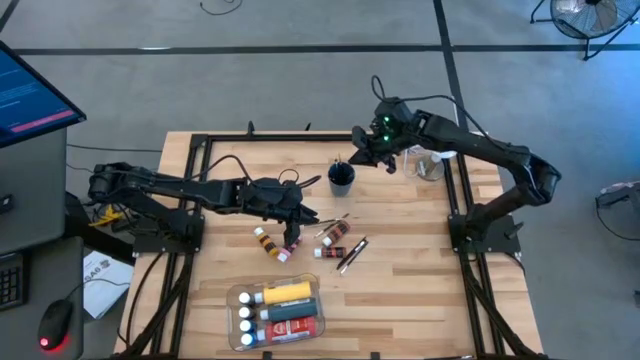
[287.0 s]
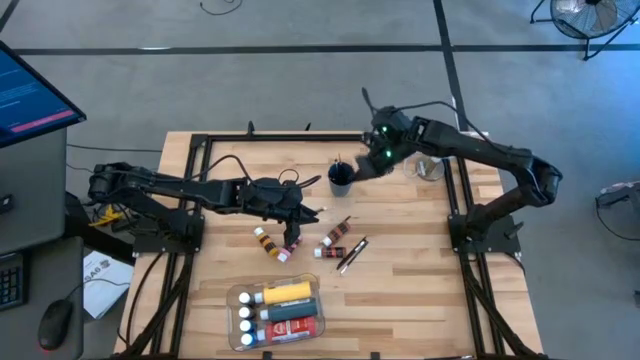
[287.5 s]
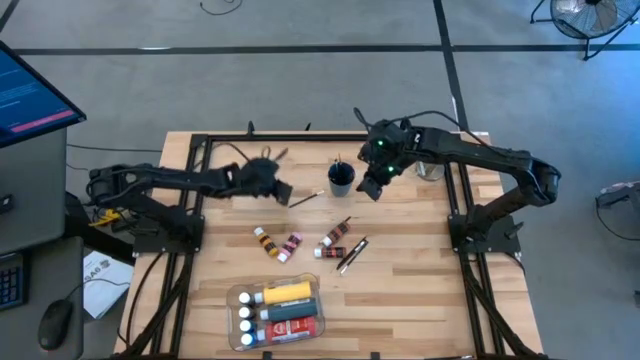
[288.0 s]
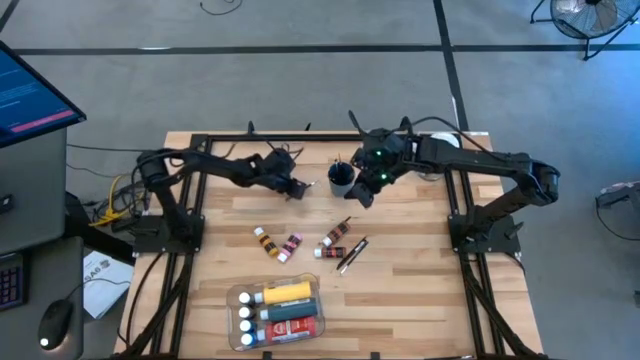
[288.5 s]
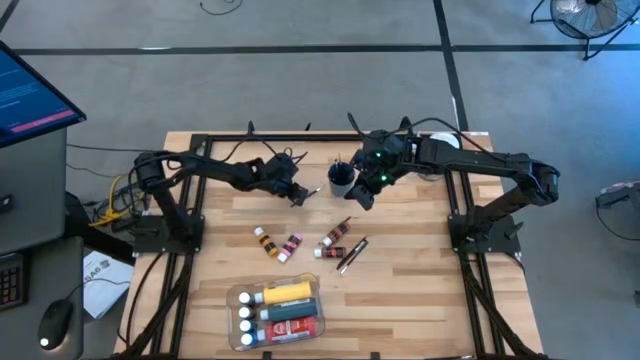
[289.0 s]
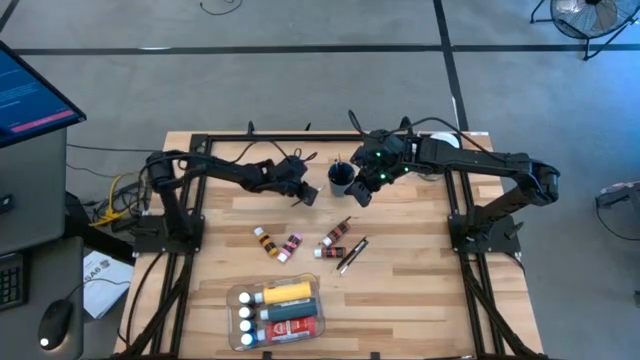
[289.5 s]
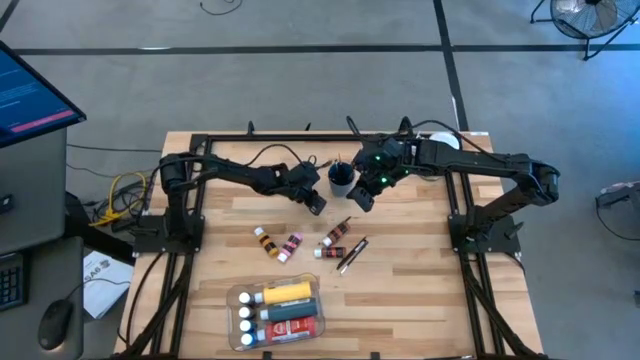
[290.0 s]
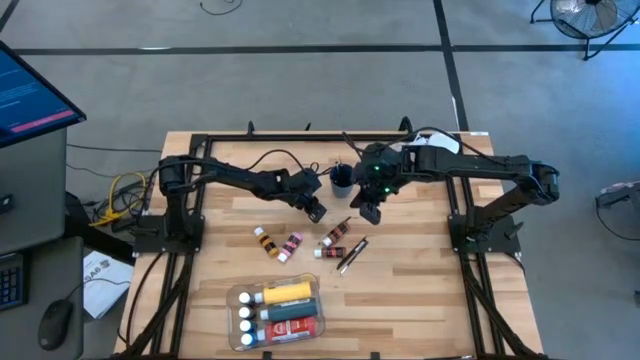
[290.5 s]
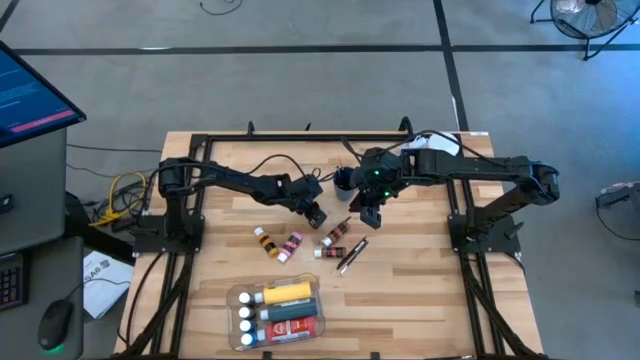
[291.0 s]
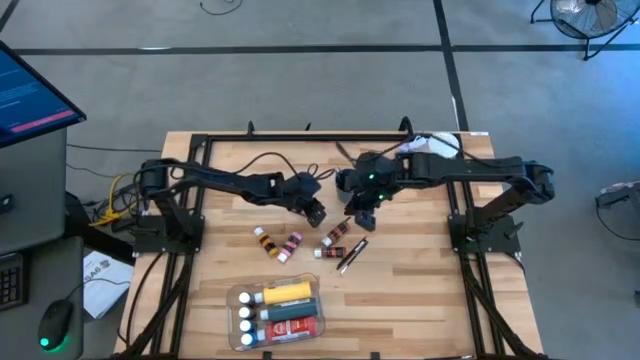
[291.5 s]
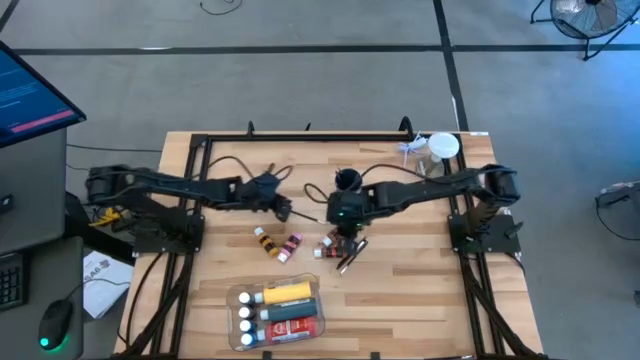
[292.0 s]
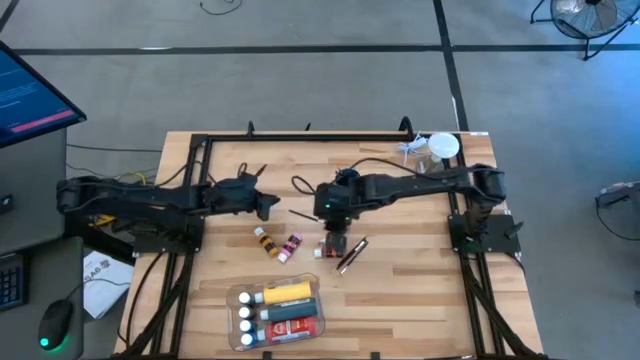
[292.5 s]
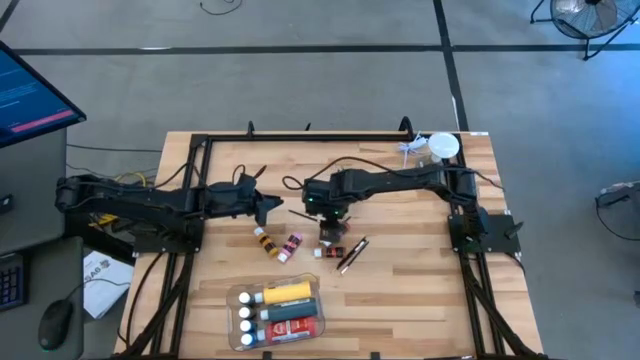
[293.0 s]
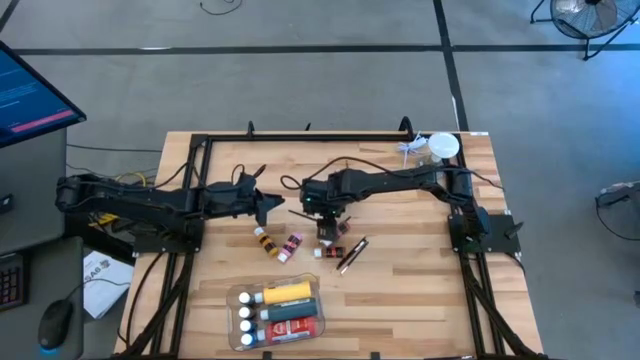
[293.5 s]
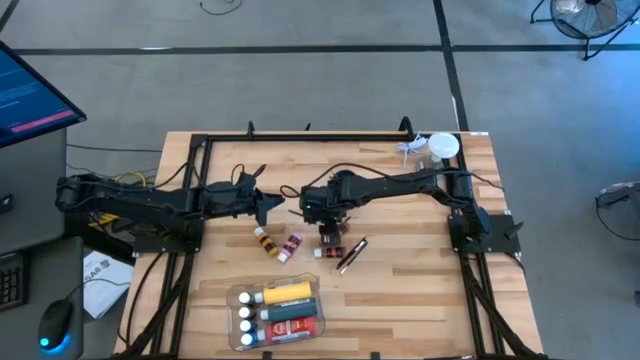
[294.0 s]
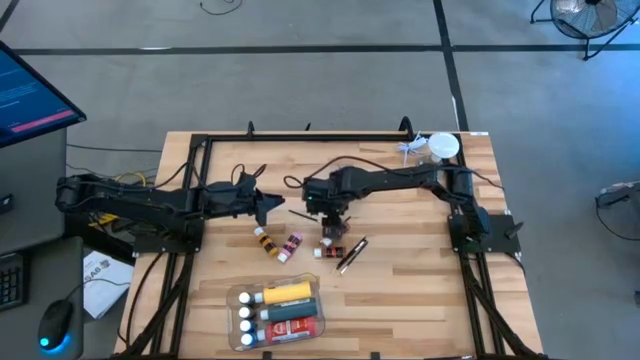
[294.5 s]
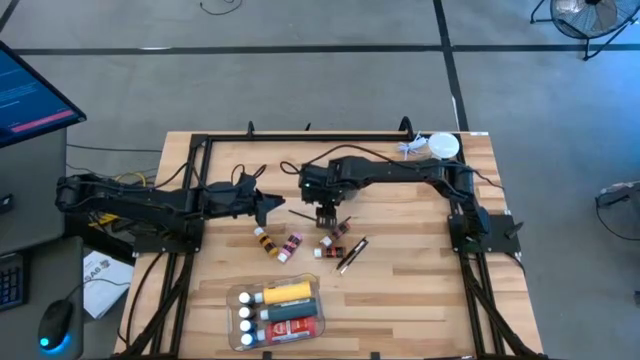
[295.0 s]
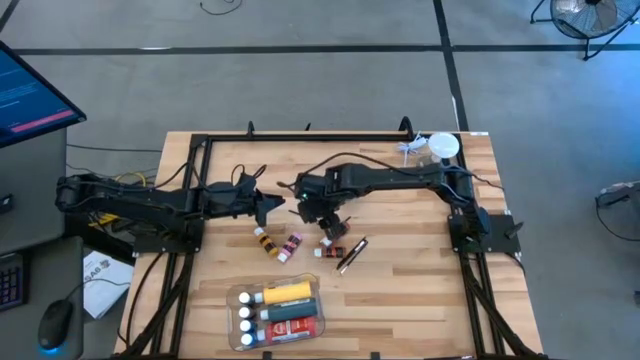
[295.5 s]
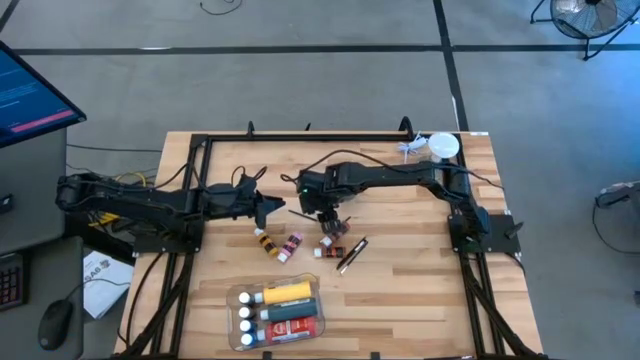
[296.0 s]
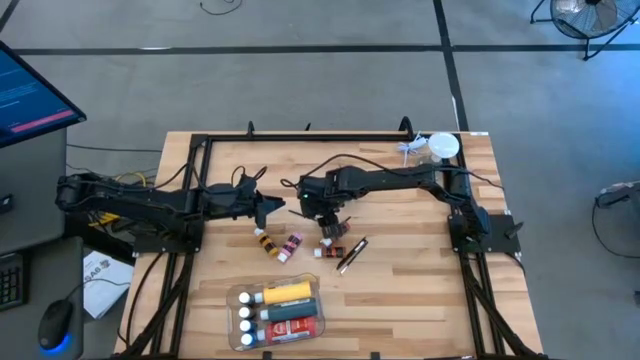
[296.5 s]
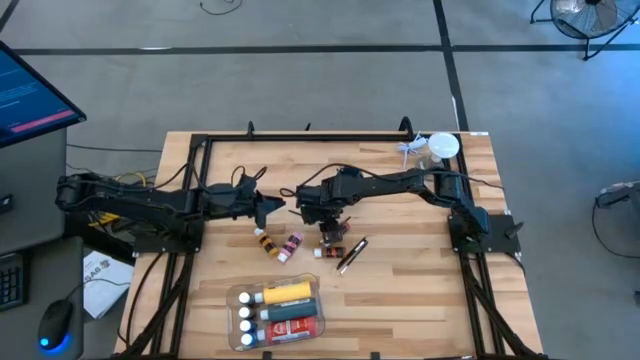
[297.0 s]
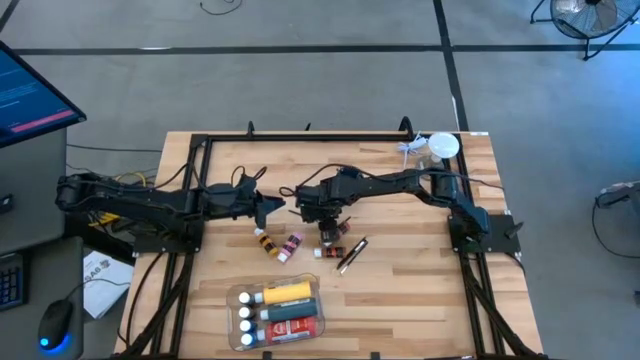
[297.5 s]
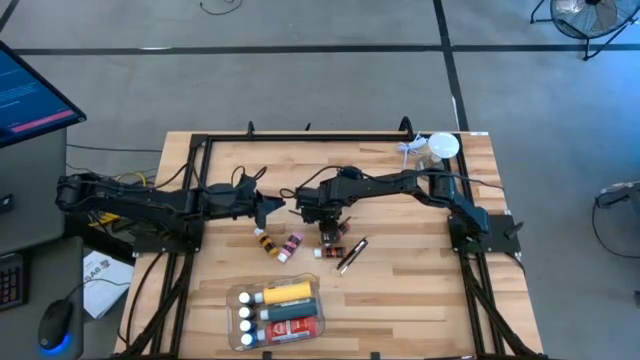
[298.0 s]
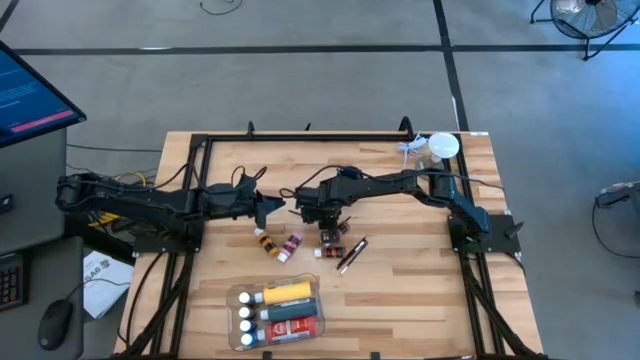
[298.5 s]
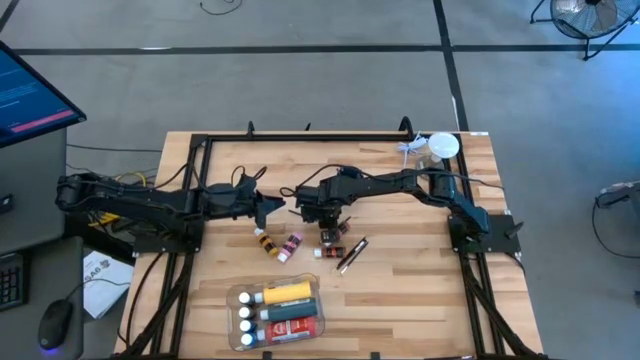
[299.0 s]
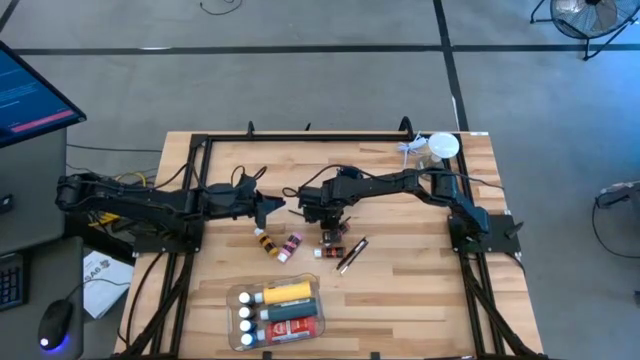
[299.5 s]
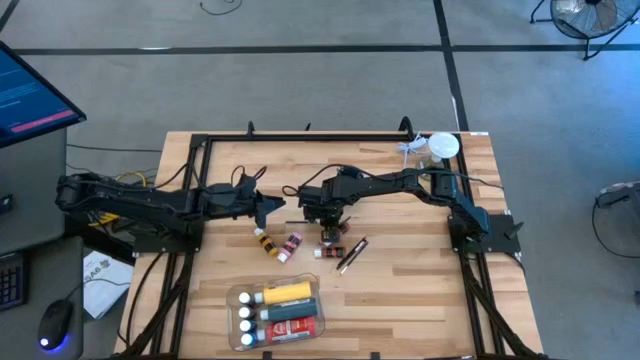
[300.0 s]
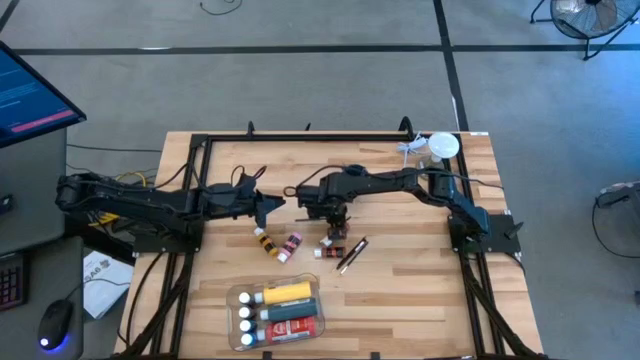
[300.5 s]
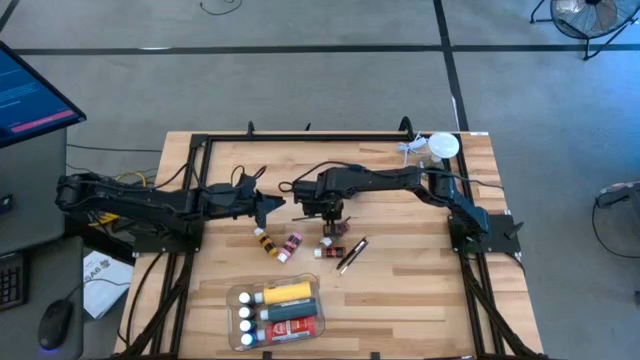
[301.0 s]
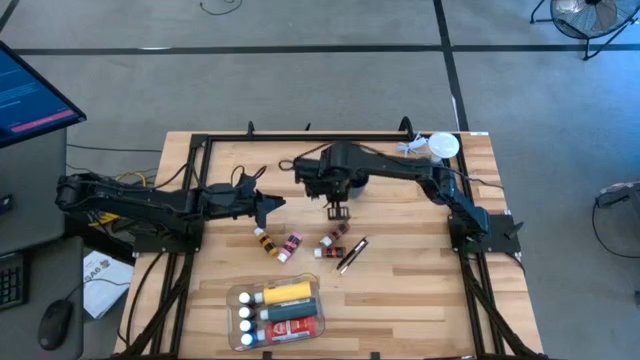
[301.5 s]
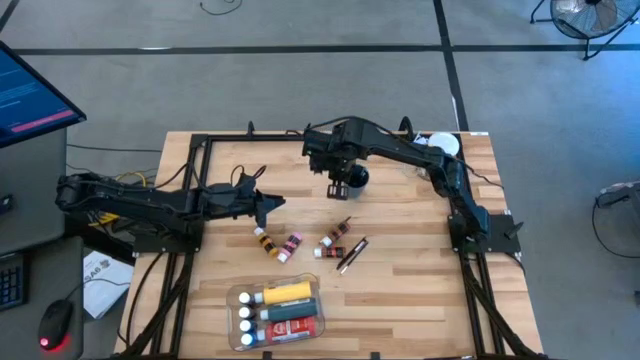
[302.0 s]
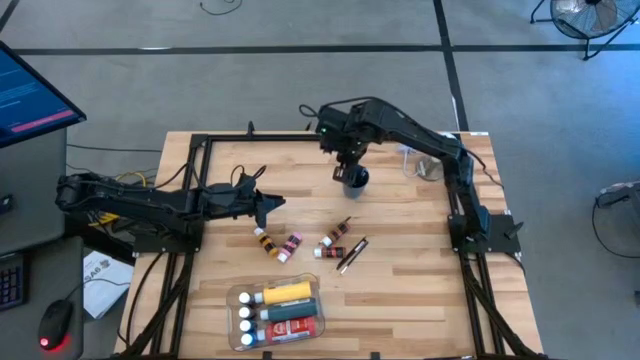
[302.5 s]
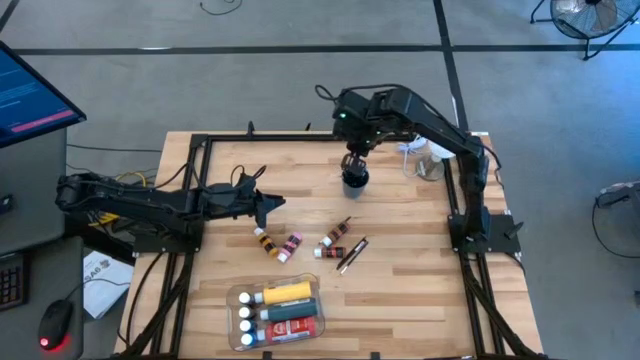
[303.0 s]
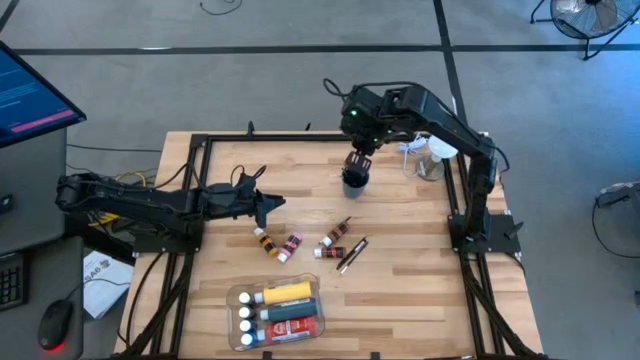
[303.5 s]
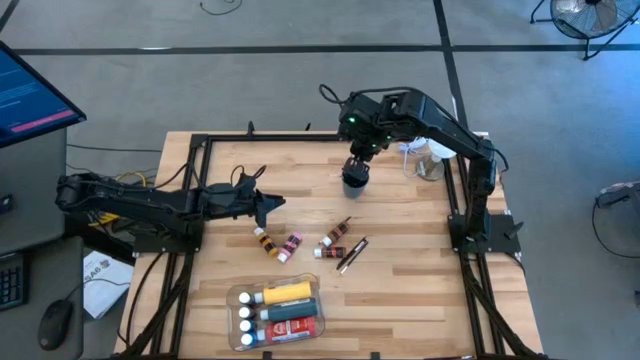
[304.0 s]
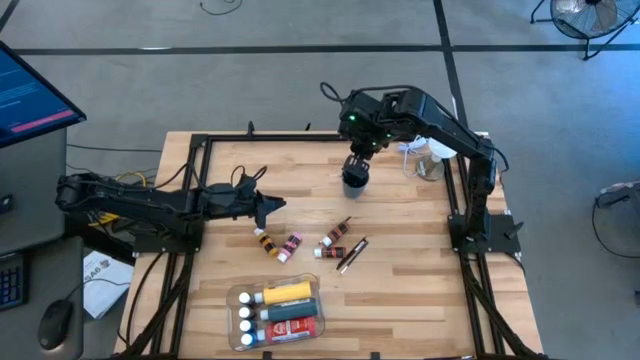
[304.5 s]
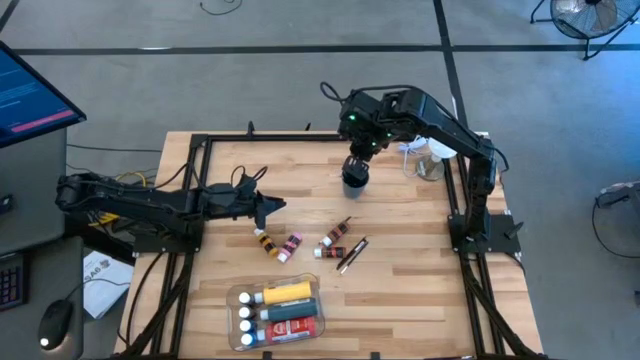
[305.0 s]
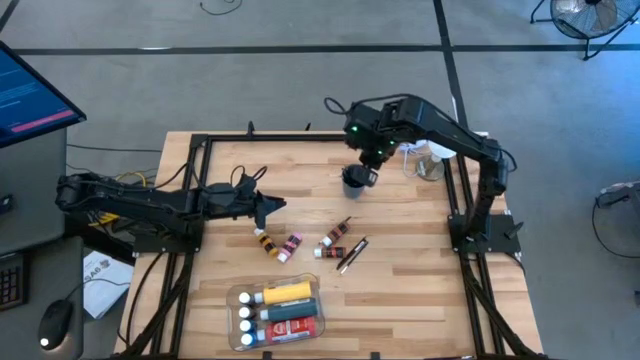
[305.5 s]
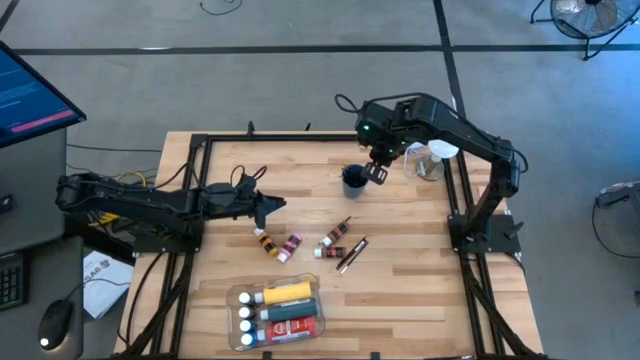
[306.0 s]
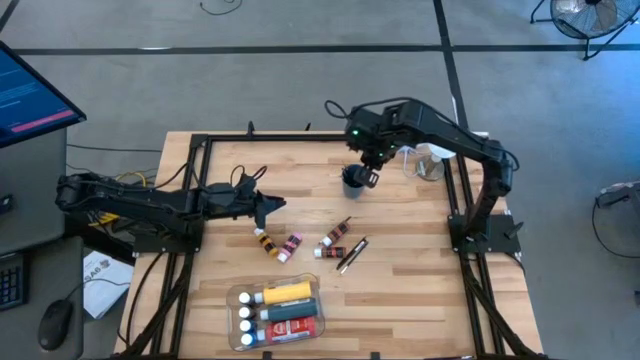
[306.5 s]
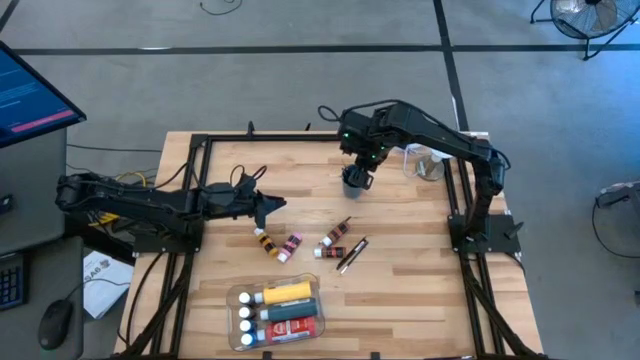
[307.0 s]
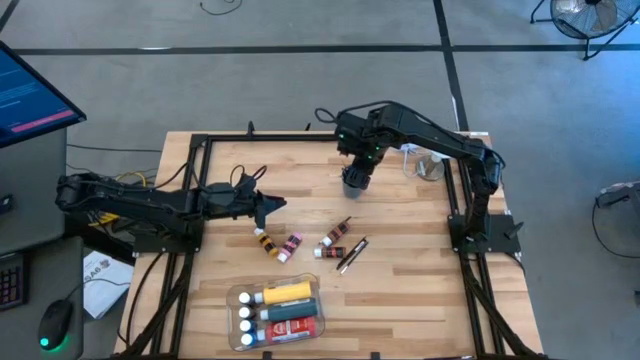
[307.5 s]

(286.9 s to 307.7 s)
Task: Pick & Place Paint Supplies
Put the paint brush into the blue cup

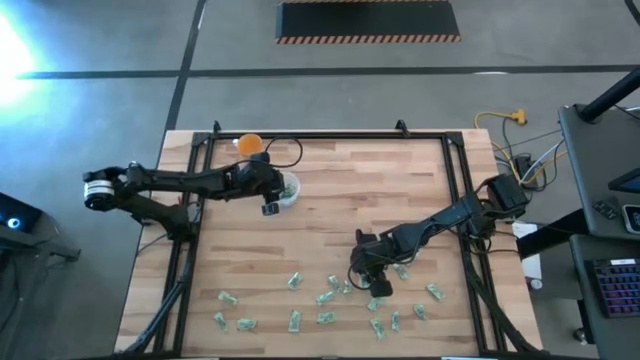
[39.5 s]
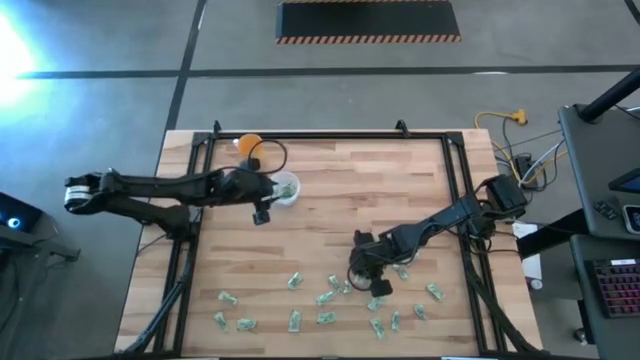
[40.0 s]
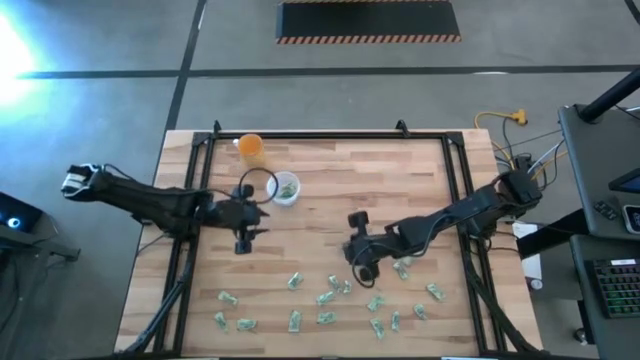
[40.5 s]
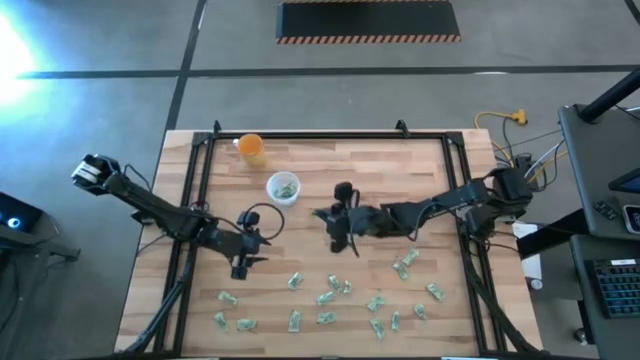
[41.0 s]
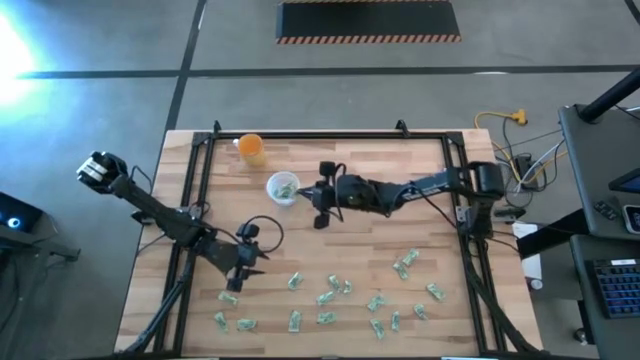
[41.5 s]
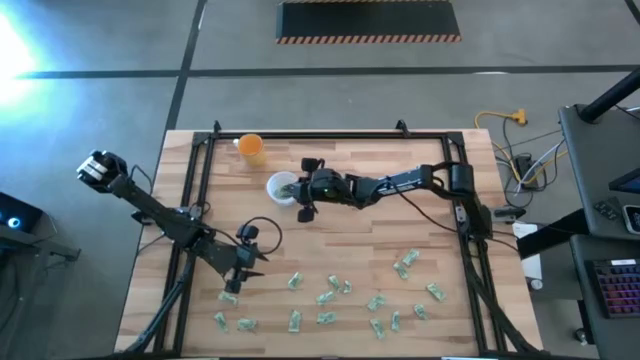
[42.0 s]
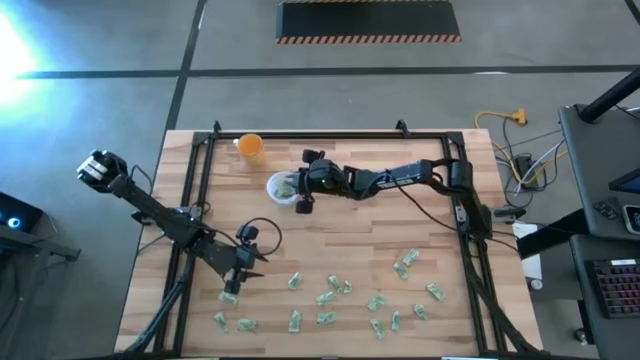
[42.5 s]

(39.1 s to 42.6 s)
Task: Pick and place Stevia / Truvia into bins
Put the stevia packet into the transparent container
